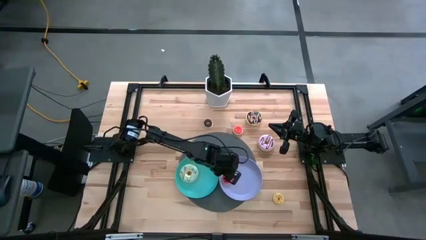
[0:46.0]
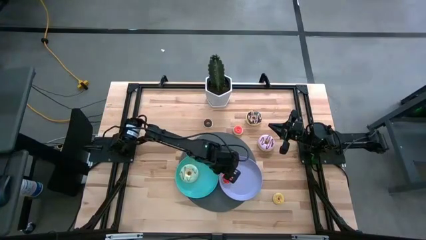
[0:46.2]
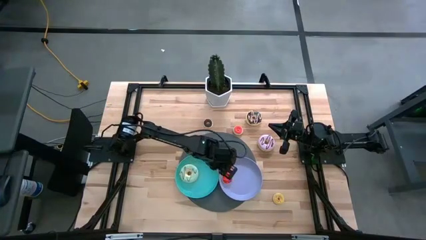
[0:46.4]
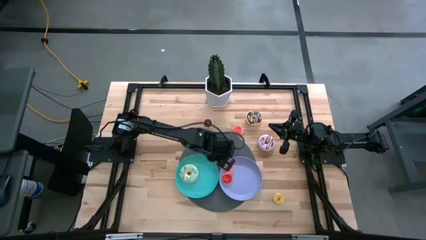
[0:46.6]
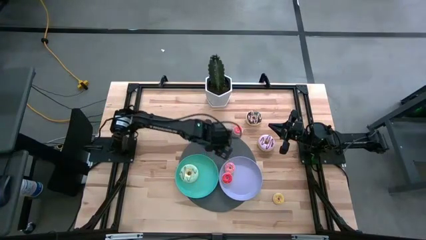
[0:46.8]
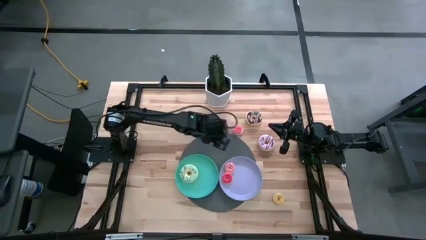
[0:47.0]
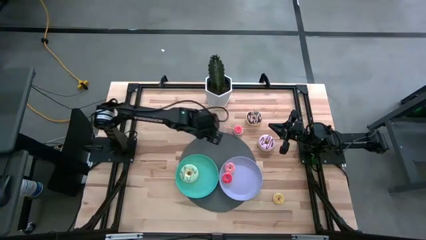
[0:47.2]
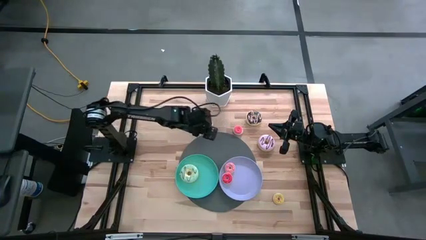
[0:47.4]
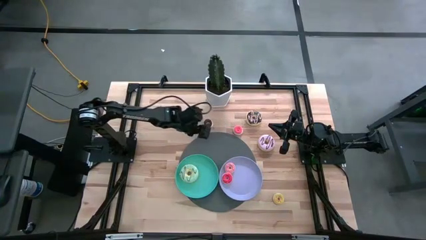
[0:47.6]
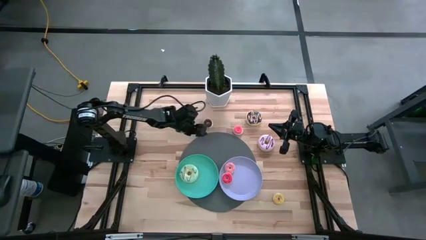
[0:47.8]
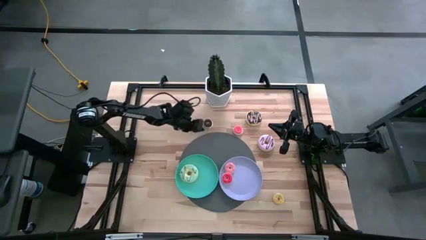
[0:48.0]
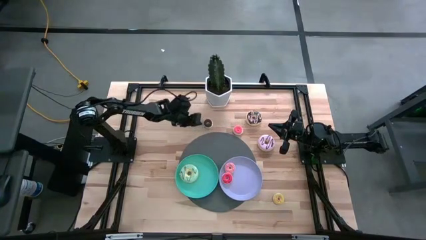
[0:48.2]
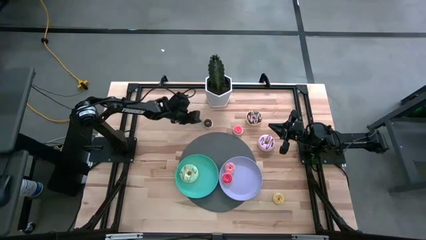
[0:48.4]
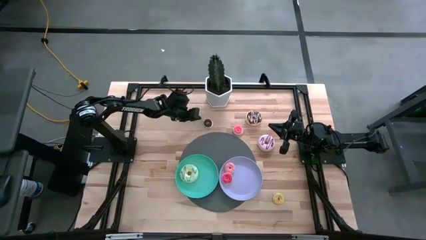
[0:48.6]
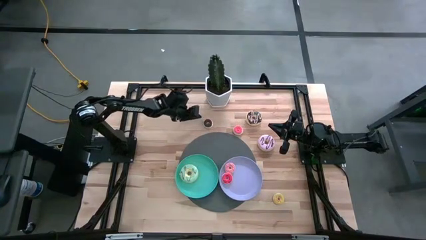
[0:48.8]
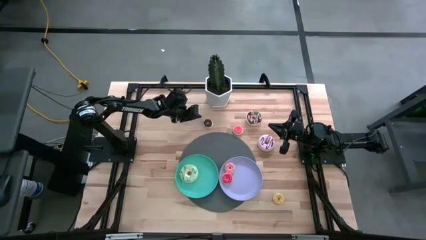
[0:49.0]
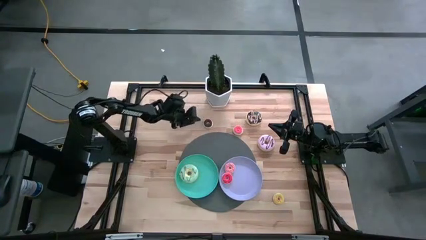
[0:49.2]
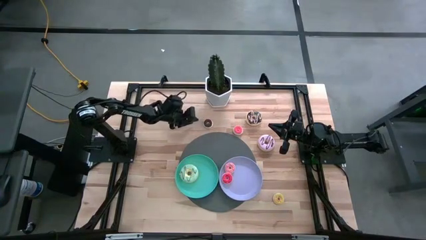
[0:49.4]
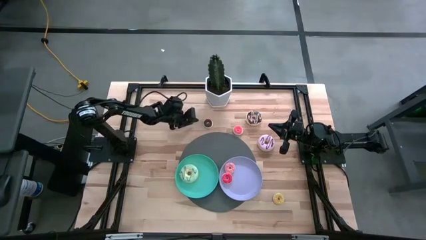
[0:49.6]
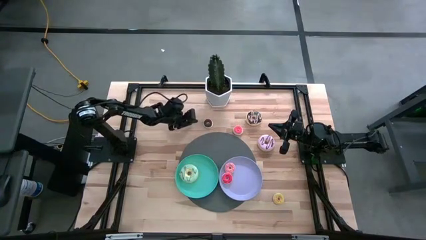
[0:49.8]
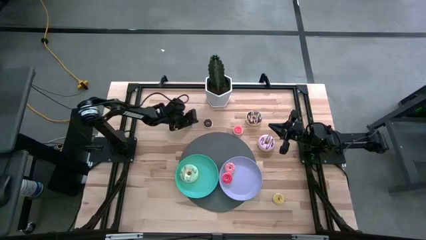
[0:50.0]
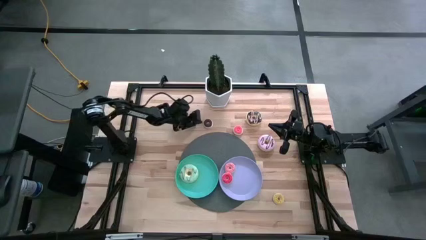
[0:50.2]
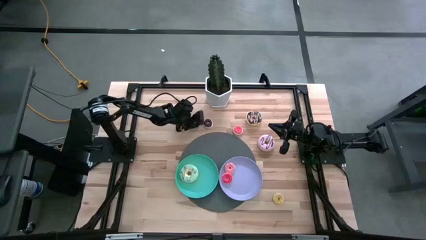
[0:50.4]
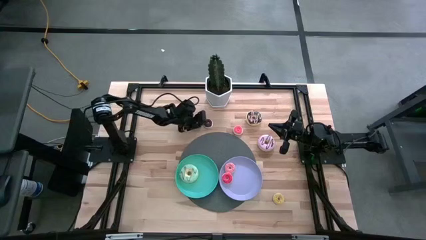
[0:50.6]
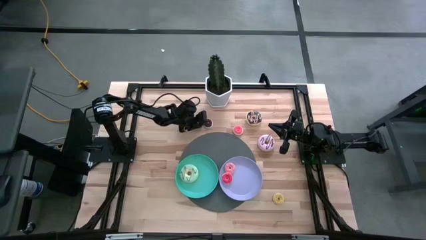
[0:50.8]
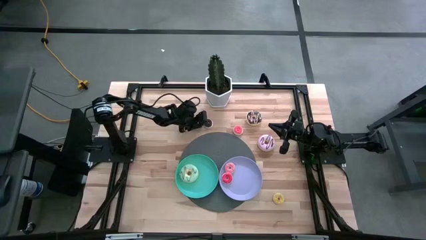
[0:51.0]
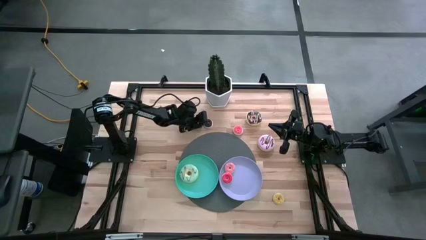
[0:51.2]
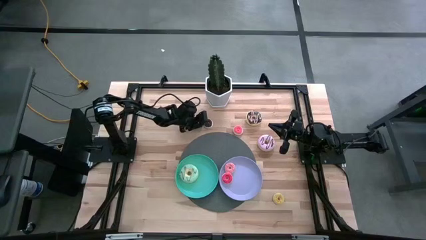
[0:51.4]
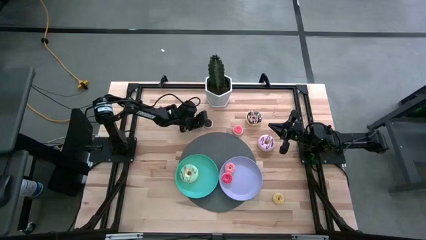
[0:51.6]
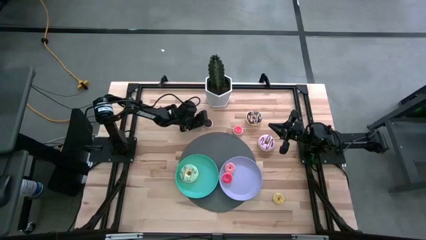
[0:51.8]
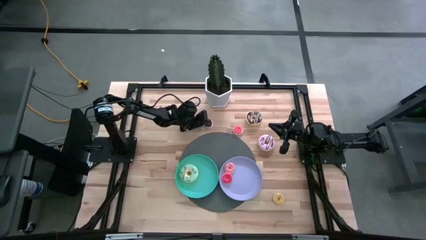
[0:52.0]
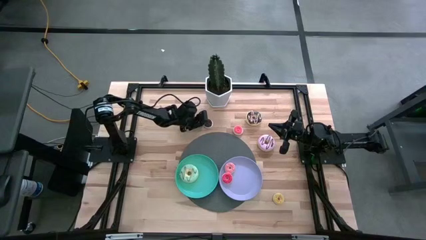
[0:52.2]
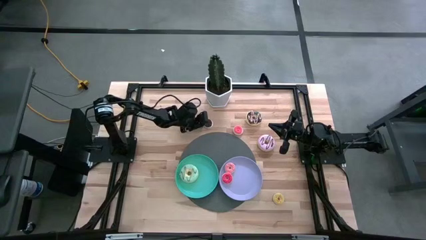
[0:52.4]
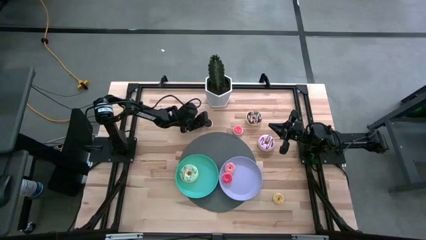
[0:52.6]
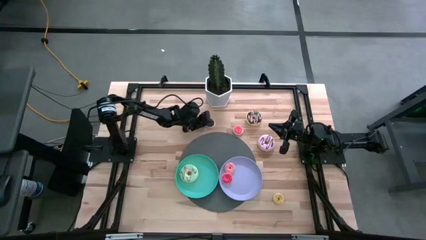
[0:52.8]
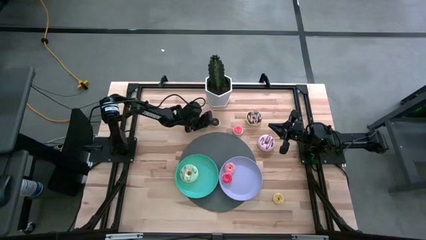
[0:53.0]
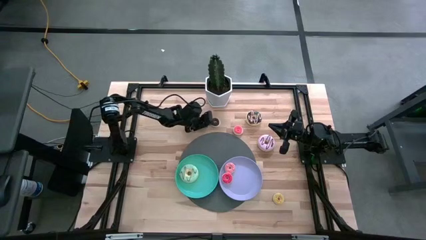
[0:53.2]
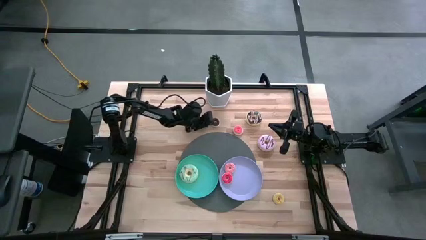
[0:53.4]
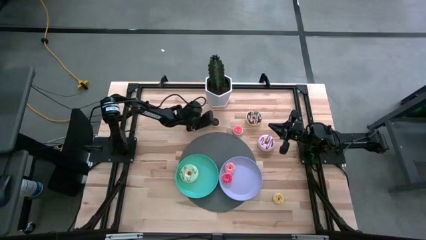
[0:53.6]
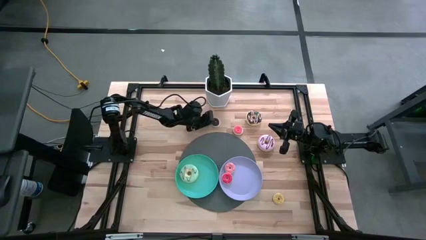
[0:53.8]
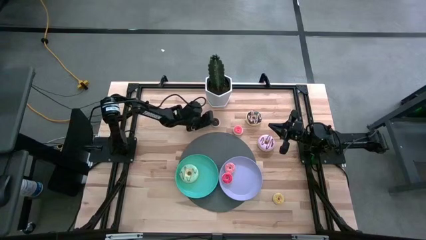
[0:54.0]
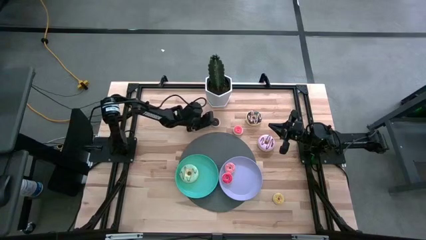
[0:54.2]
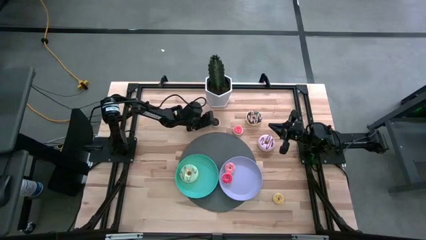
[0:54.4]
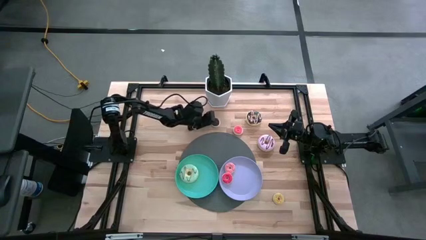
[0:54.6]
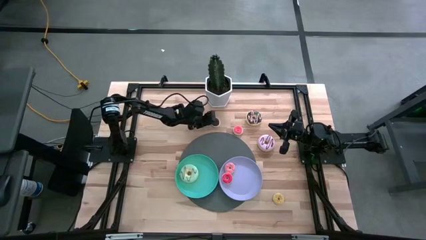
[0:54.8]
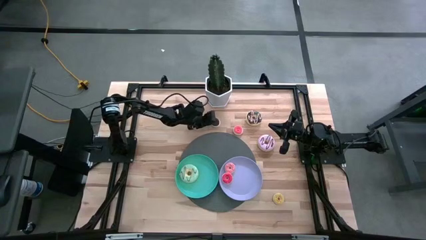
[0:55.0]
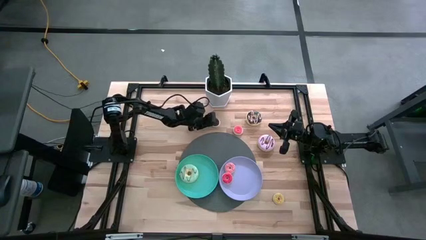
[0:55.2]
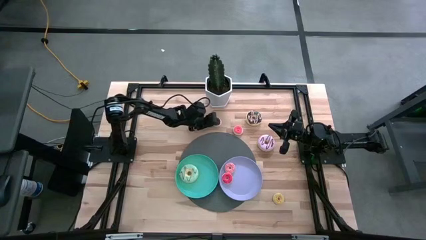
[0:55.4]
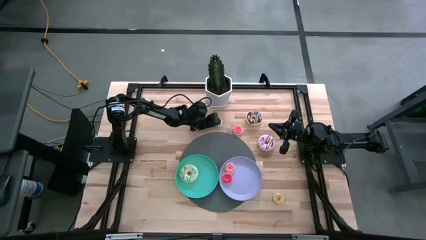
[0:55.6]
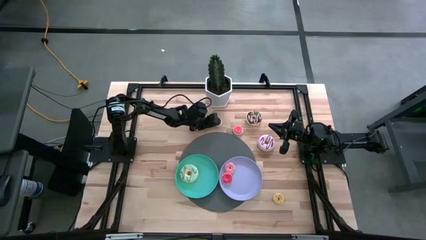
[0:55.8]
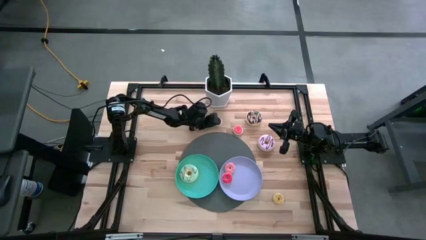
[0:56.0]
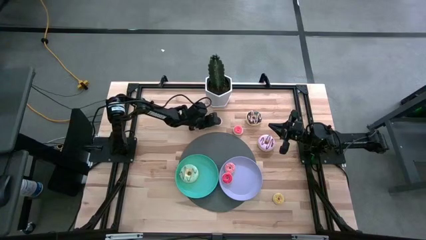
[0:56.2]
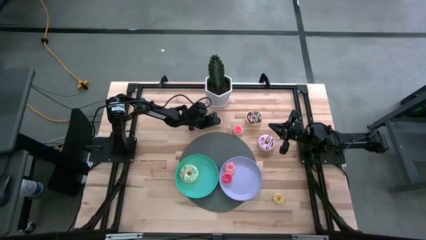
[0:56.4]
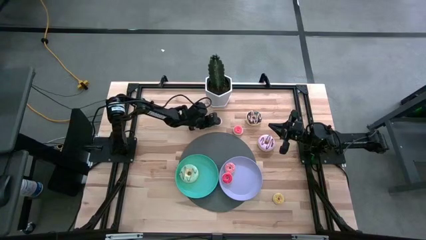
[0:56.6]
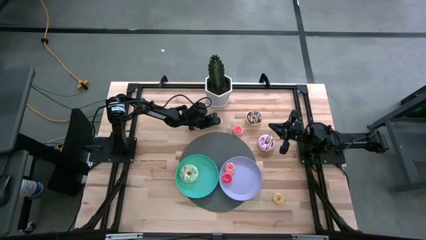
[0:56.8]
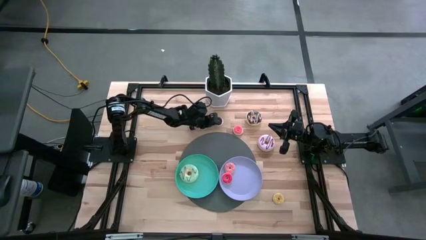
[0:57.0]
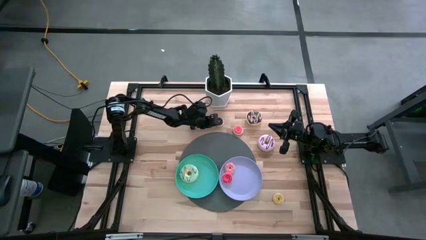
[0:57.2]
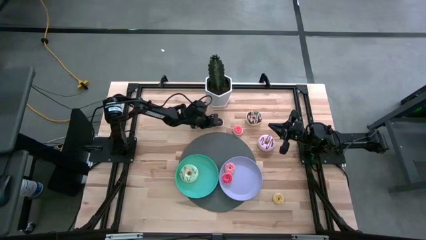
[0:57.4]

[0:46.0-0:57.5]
Task: Pick & Place donuts
Put the small brown donut on the purple plate

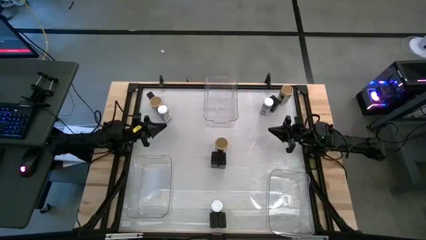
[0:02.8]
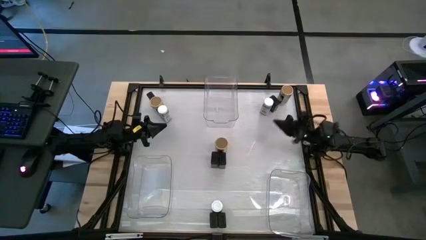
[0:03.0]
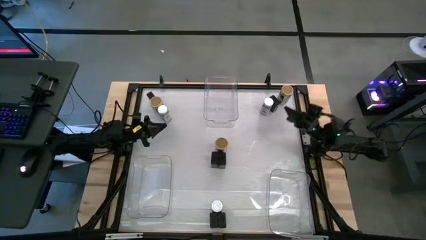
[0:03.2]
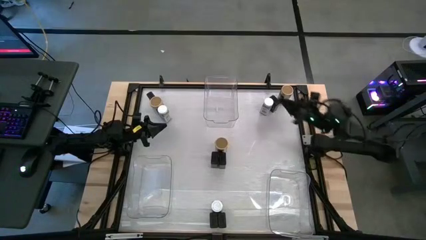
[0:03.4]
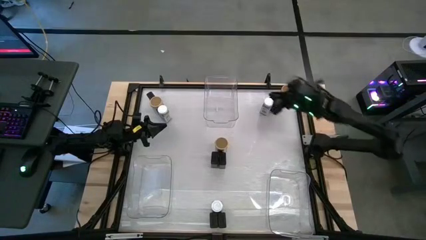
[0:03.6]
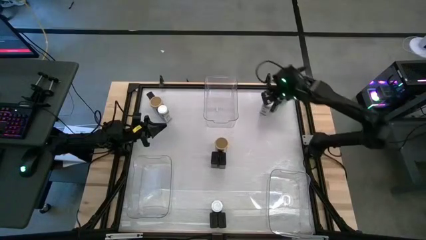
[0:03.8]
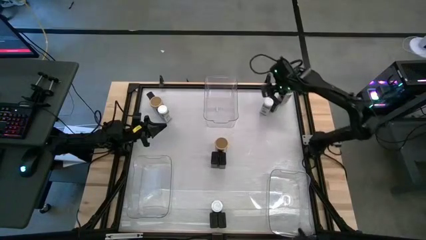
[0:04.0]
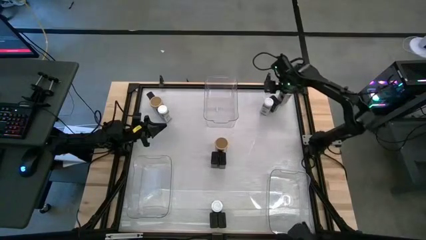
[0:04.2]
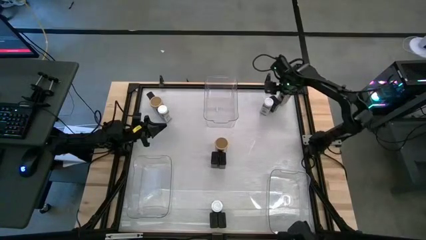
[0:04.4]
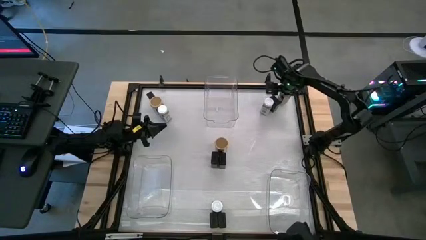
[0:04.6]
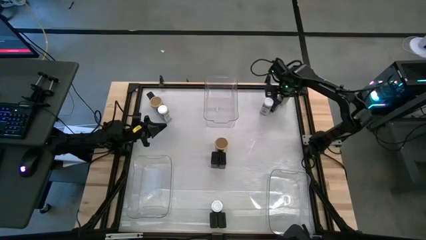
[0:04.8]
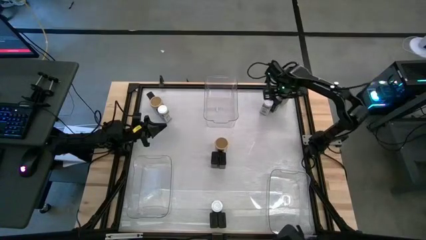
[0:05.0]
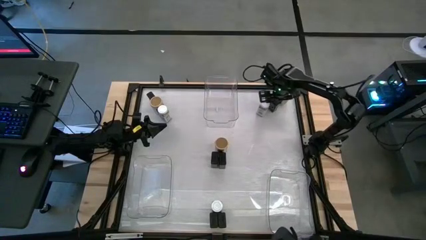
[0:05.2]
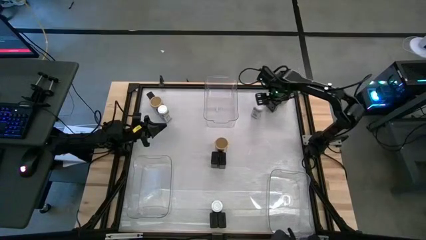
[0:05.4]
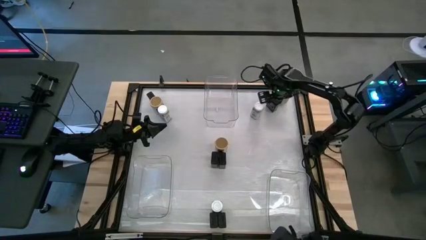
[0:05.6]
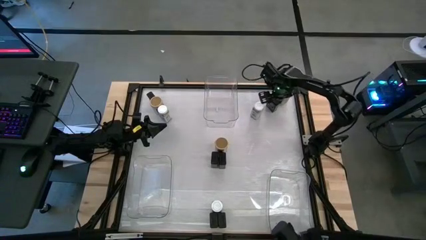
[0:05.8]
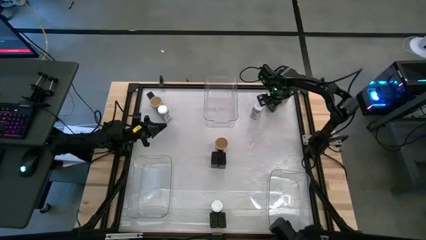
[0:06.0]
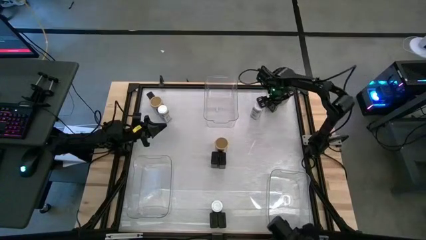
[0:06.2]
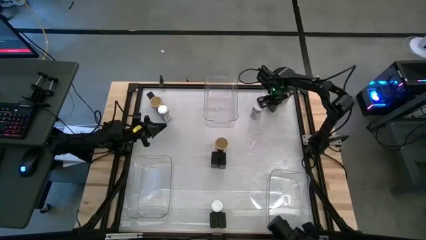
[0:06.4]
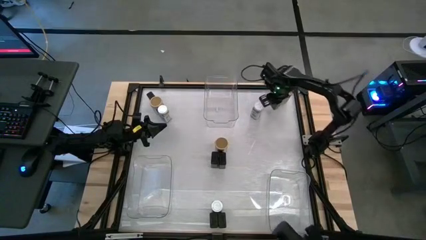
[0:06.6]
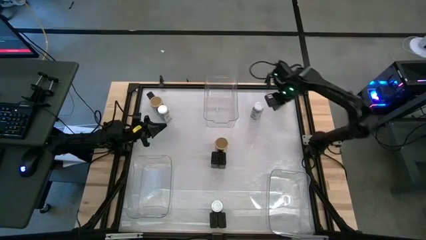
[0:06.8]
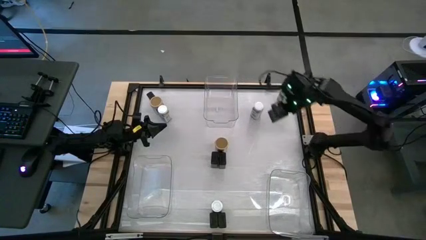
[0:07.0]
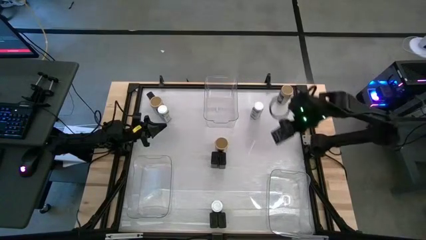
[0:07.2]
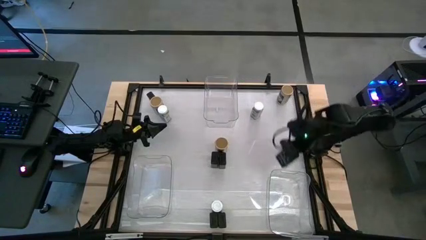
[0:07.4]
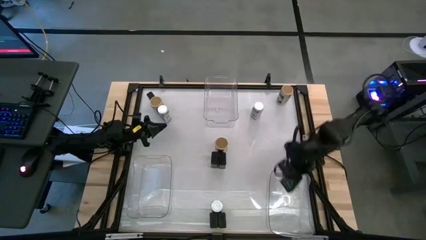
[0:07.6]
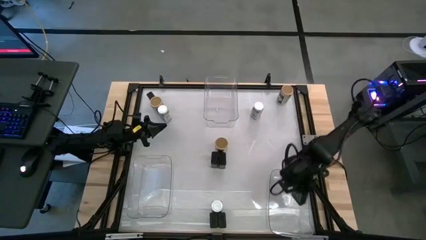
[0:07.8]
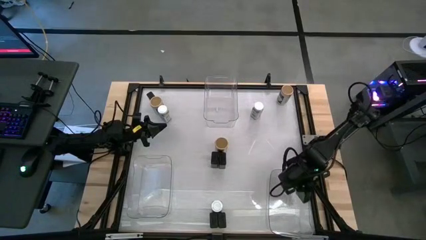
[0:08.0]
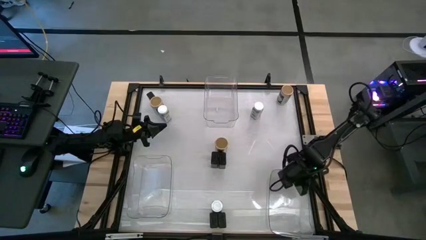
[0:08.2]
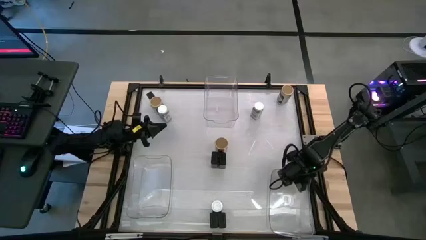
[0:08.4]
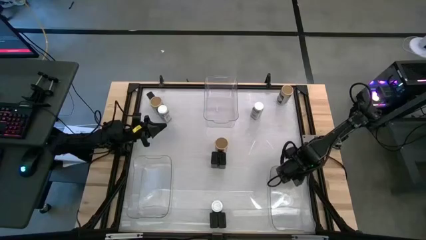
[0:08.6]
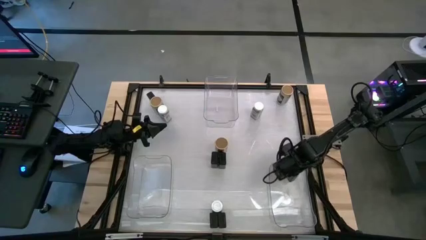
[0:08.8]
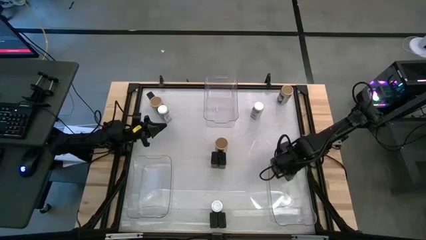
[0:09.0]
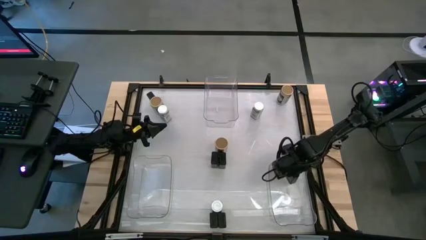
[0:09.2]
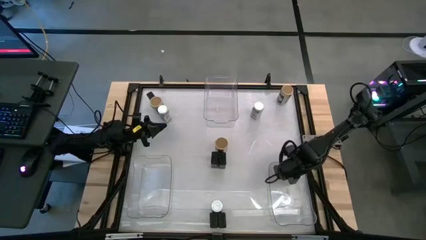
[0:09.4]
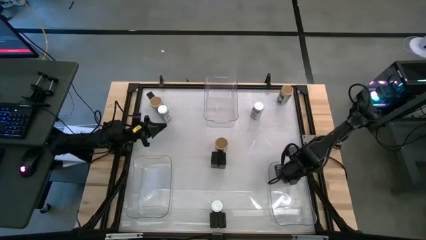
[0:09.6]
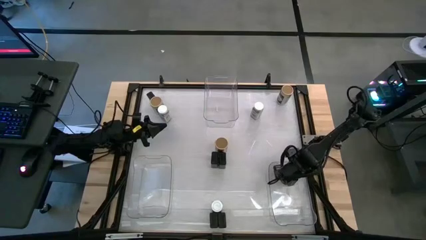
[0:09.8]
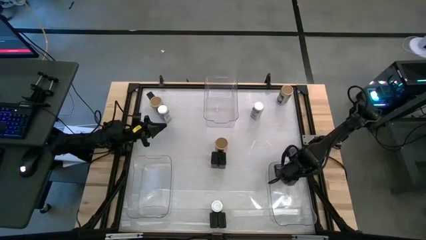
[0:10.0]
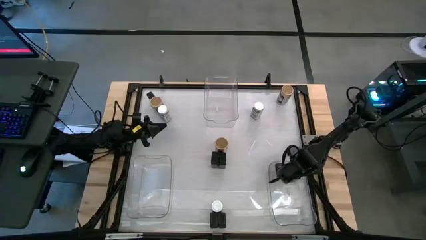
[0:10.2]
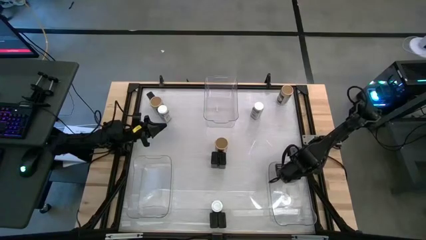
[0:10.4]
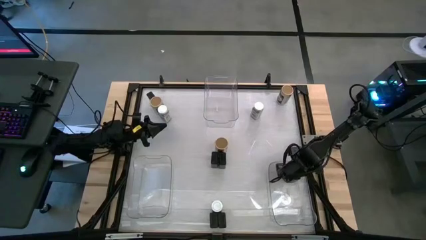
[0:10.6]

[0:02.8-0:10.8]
Task: Sort spices by type
Put the black spice can into the right transparent bin
